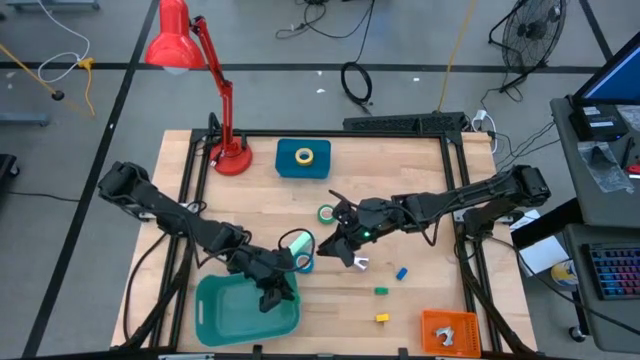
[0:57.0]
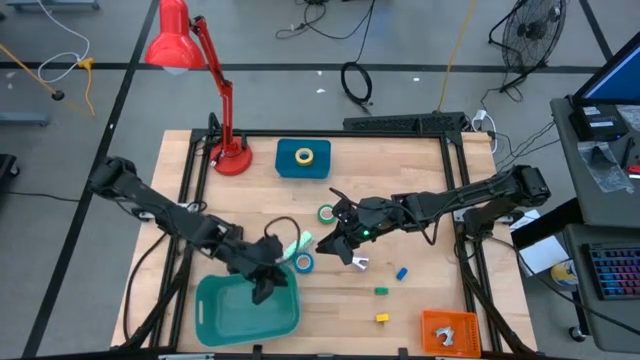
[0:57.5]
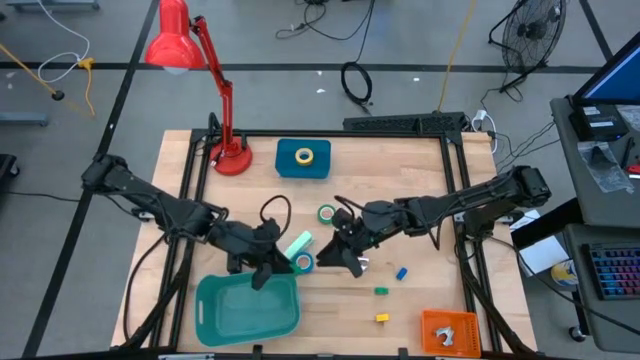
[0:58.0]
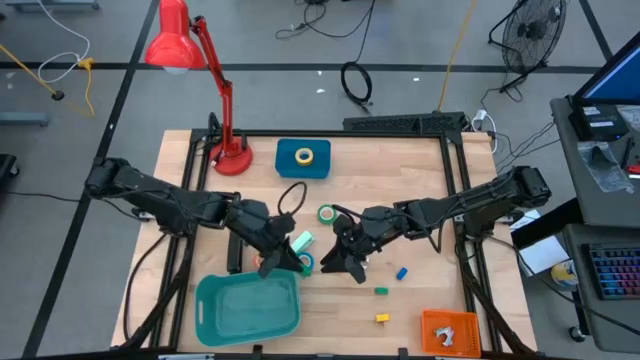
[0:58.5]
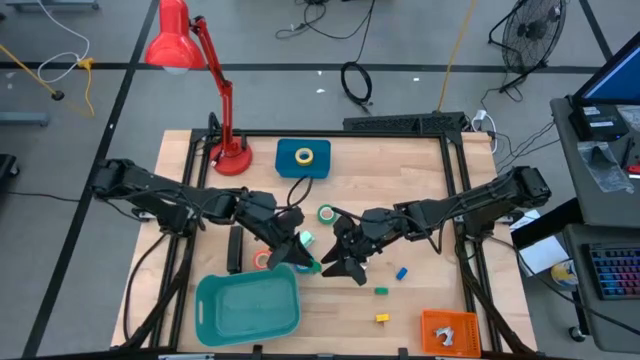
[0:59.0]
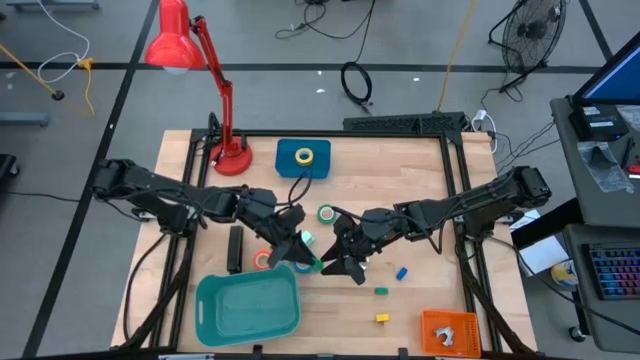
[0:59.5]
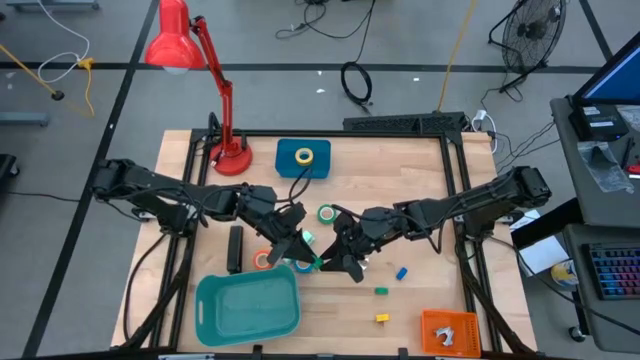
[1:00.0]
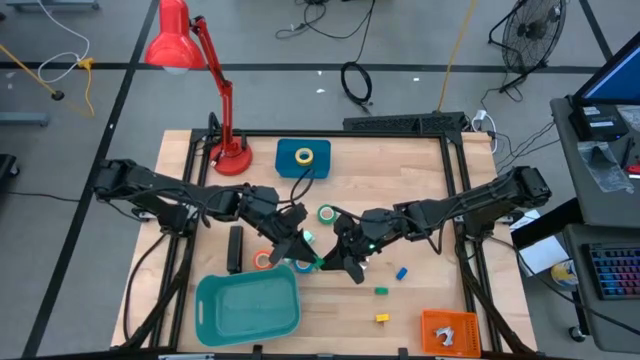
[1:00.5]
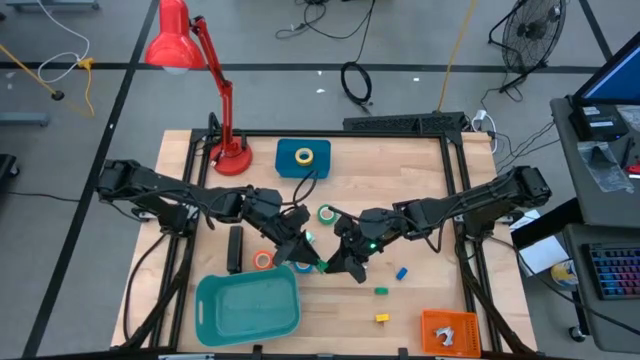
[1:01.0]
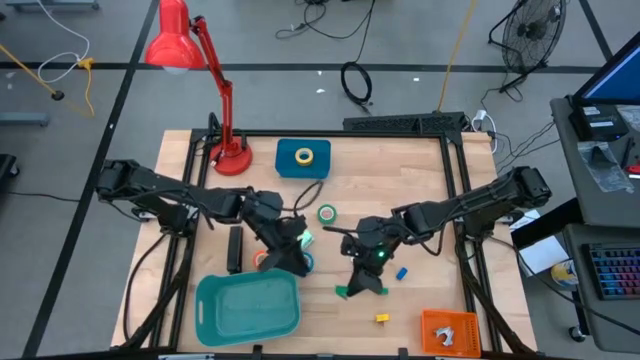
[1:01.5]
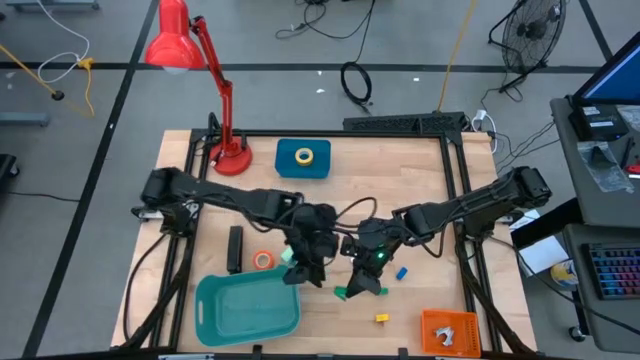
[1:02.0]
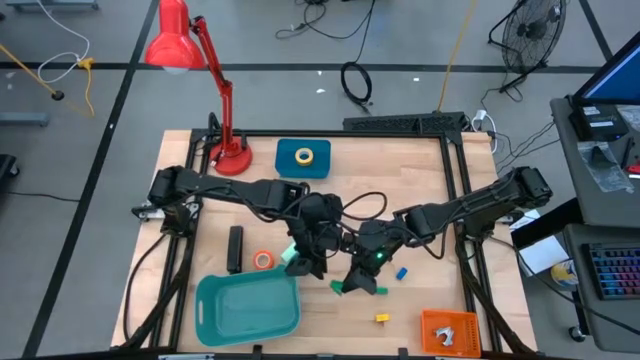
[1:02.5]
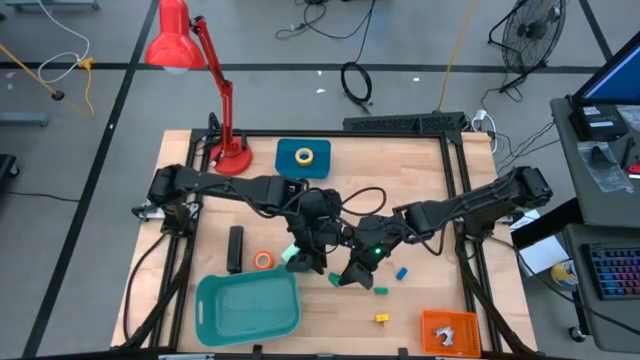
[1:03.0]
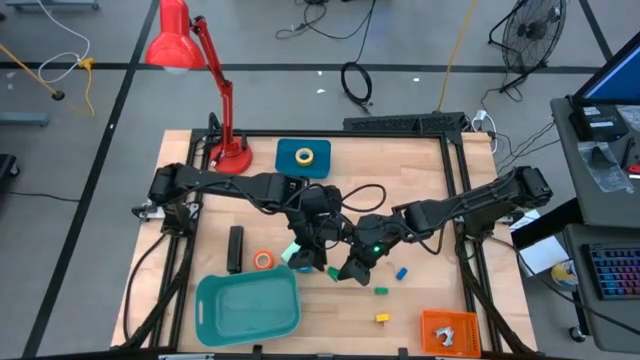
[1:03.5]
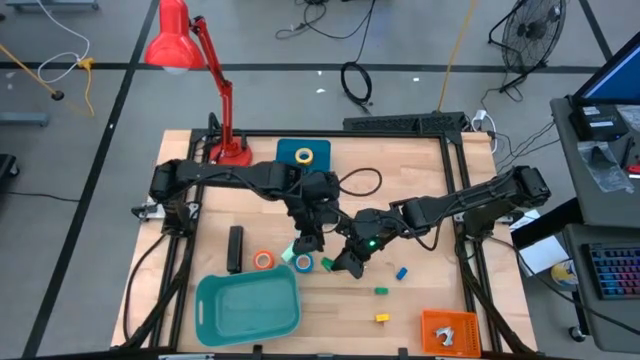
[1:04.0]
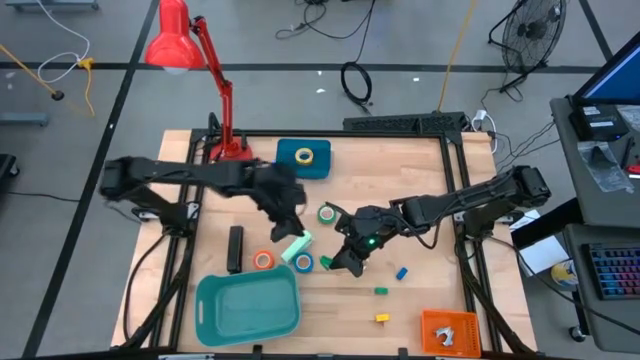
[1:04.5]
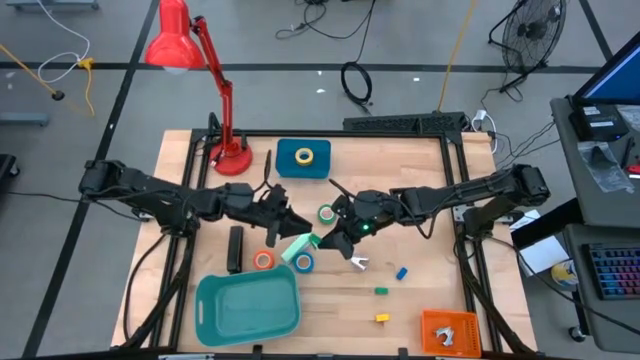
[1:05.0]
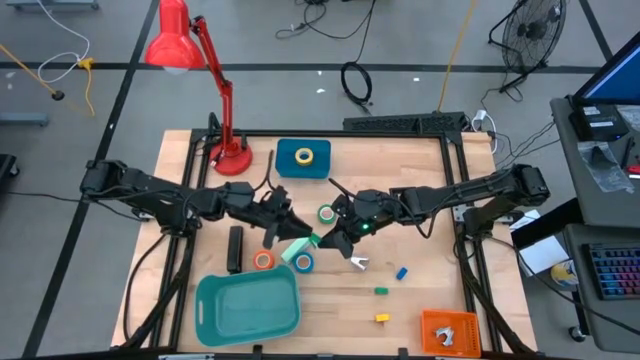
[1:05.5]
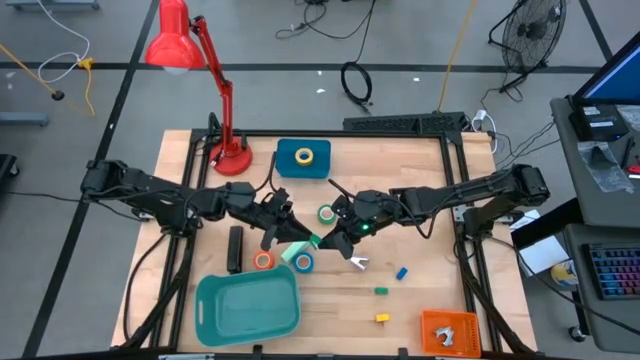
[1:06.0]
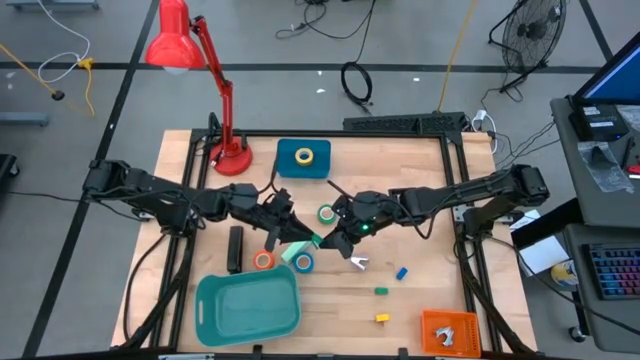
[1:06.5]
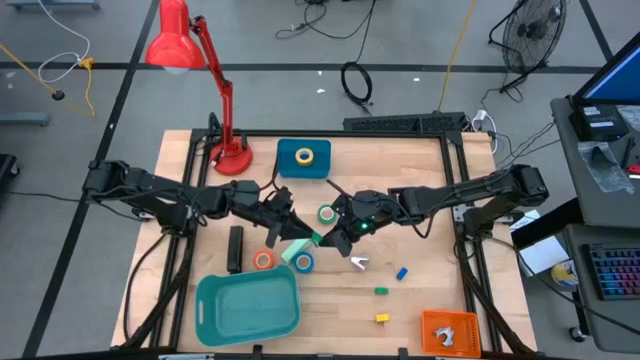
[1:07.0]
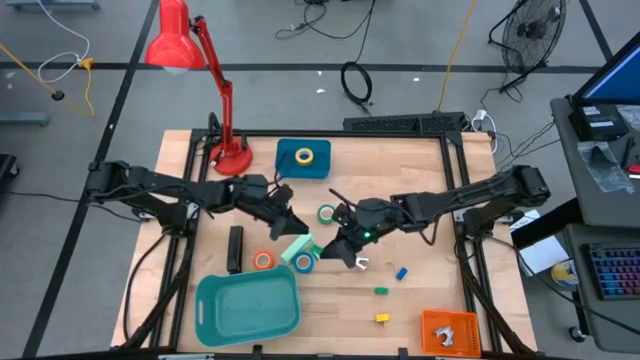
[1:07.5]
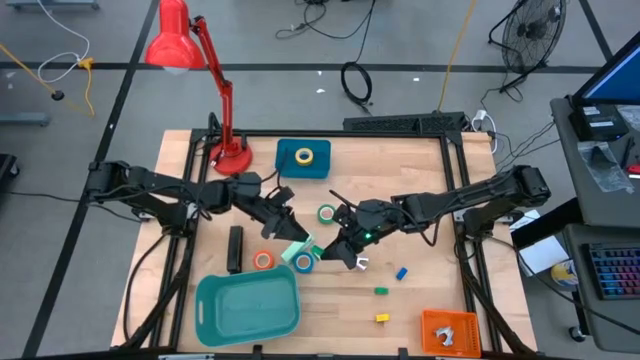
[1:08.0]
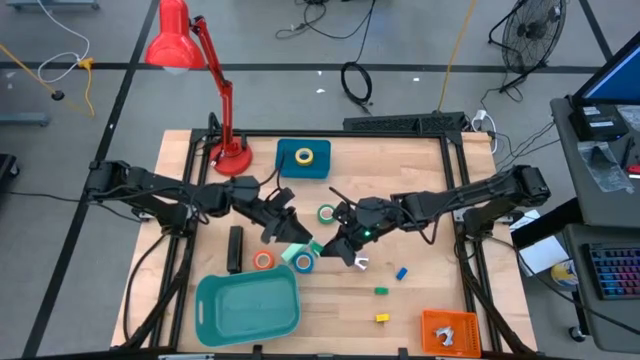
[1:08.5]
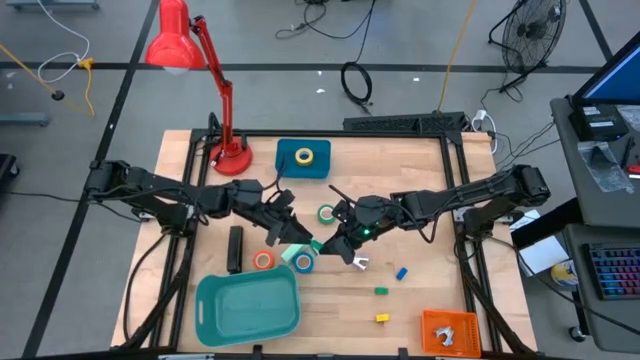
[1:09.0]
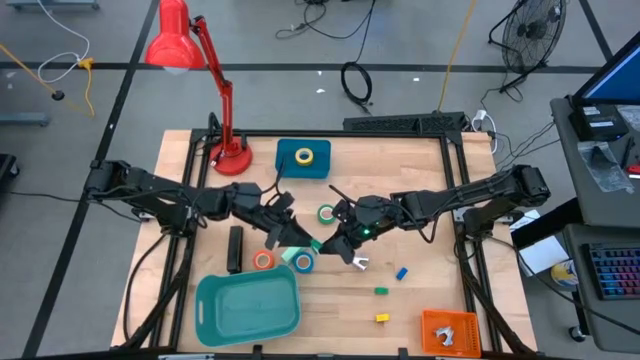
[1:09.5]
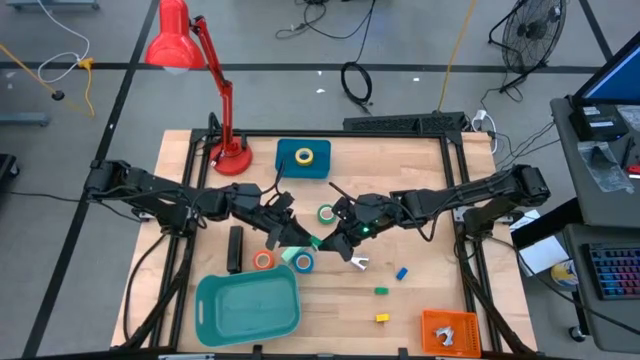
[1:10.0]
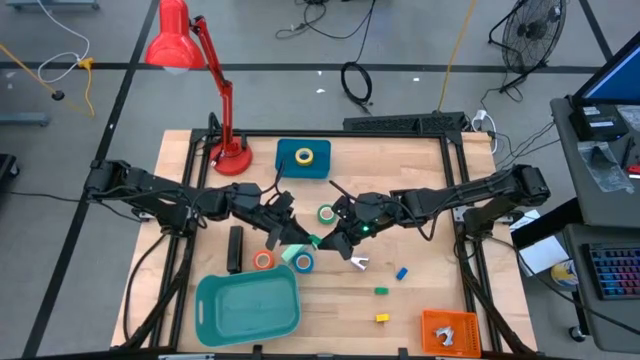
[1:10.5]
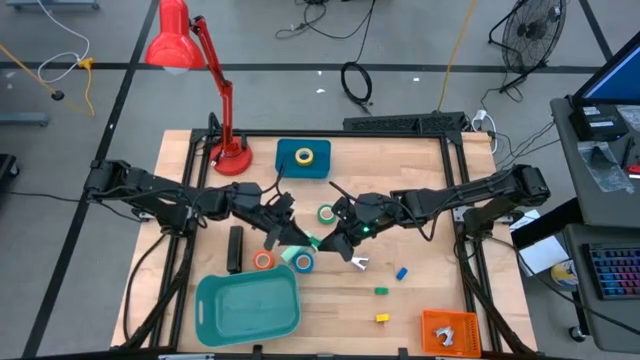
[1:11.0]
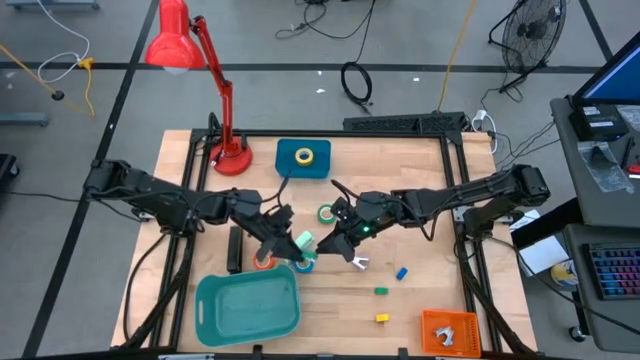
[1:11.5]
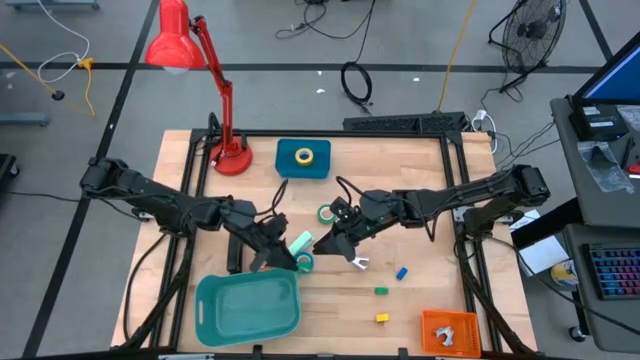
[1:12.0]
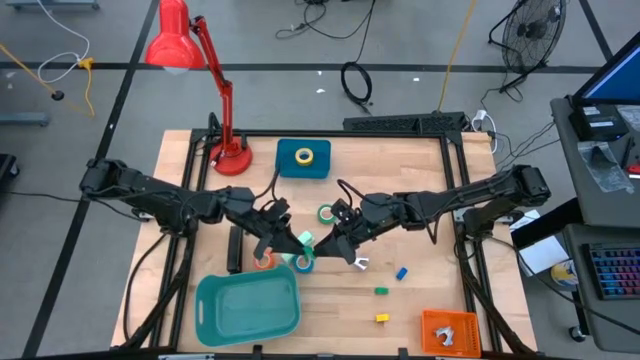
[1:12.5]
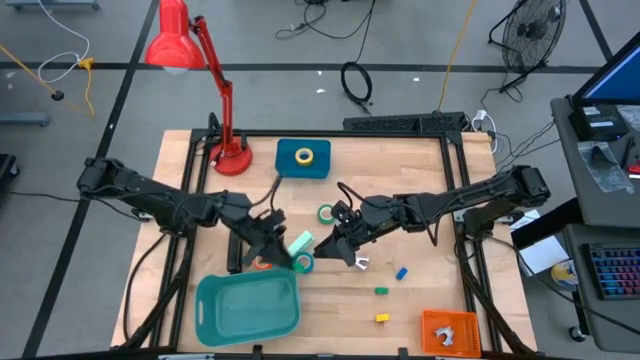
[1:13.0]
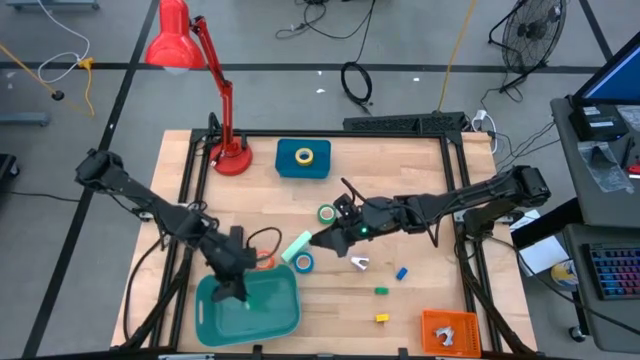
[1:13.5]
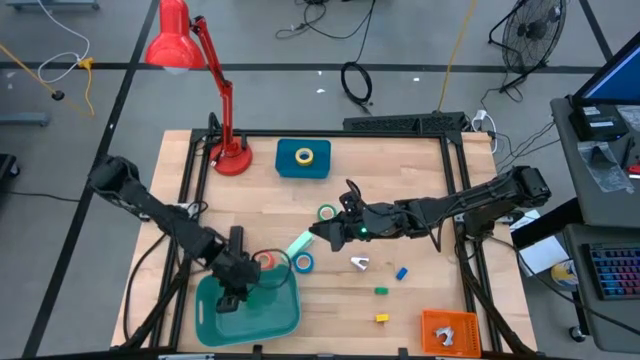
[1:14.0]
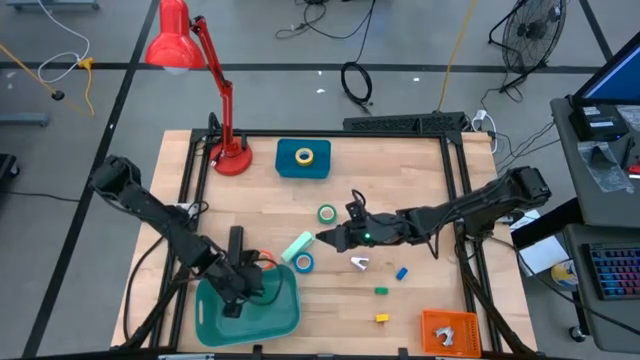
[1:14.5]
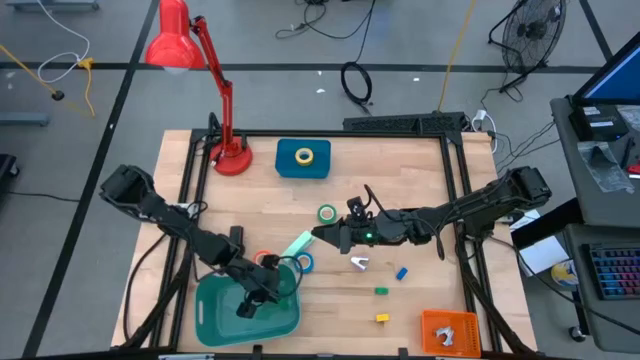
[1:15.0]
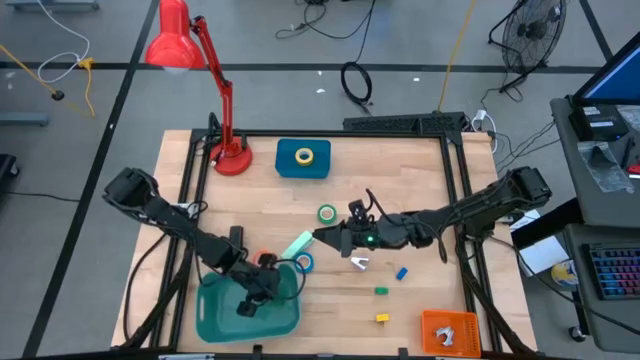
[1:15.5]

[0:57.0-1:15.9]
Task: Pick and place Stapler, Stapler remover, tape
Put the right green stapler into the green bin

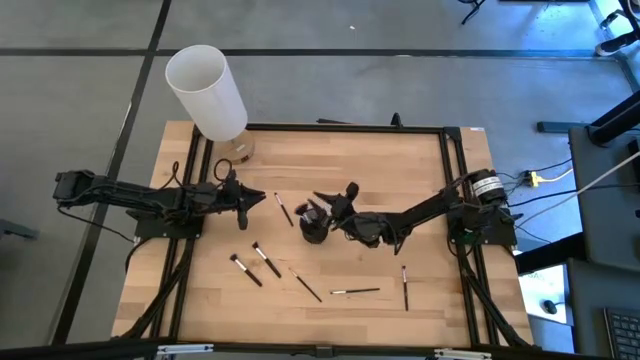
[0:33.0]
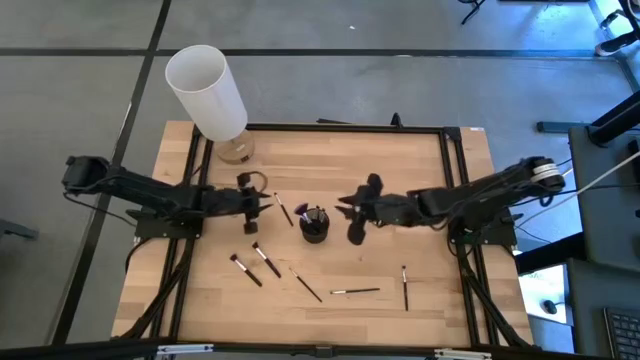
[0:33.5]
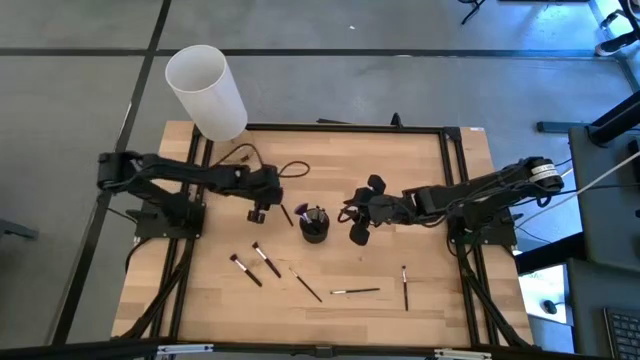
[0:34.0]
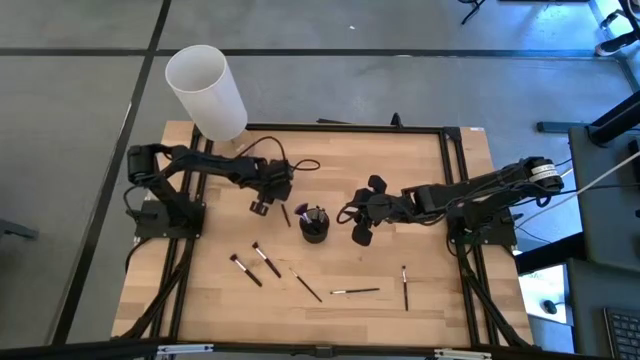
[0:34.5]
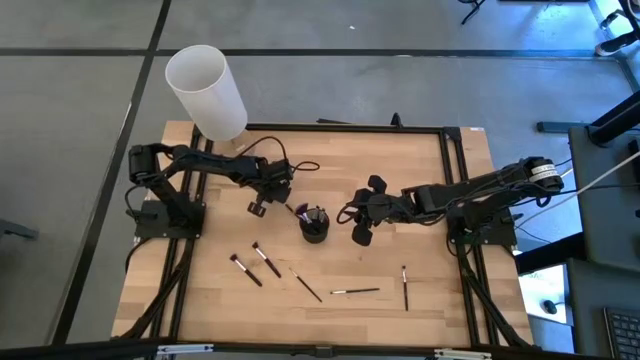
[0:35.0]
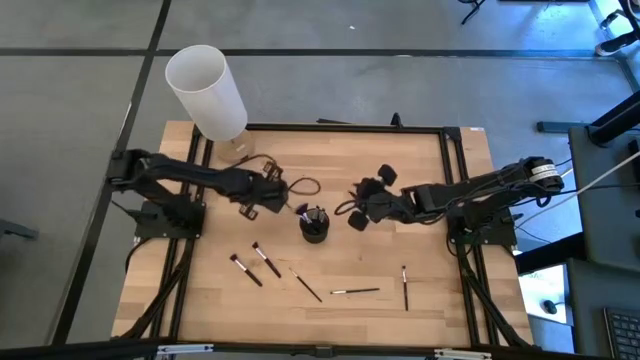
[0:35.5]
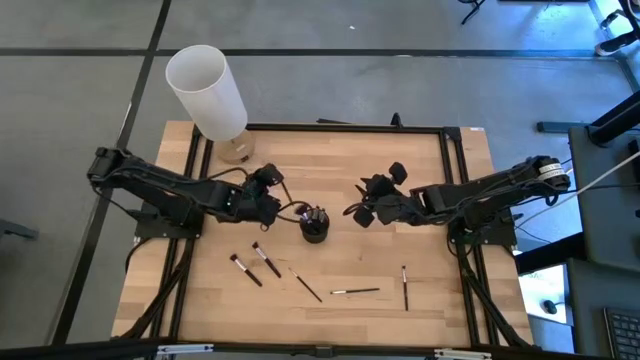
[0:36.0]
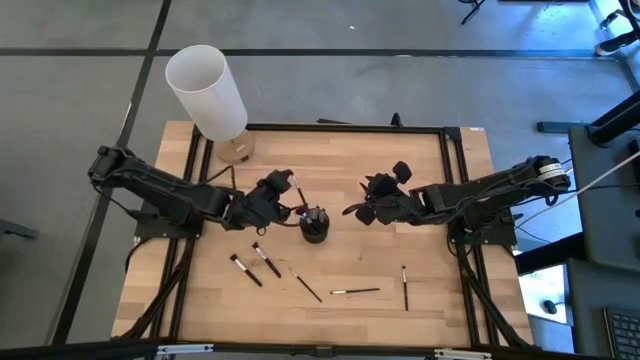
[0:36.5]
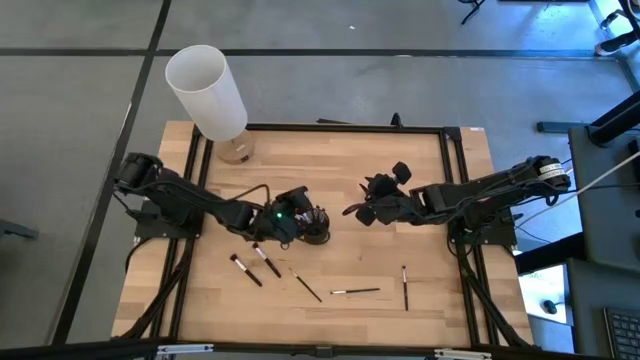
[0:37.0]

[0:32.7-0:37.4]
Task: Sort items
Put the silver eyeshadow brush into the pen holder
